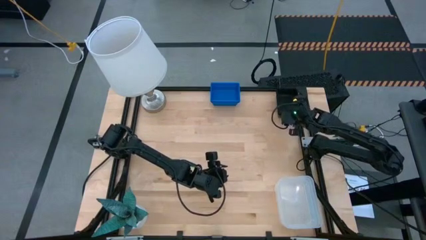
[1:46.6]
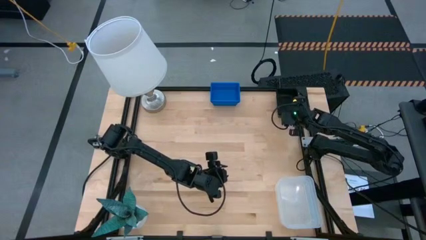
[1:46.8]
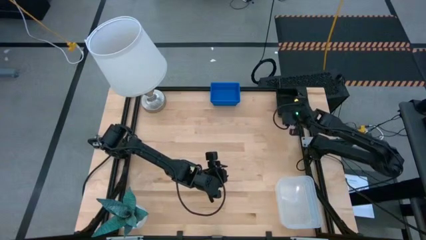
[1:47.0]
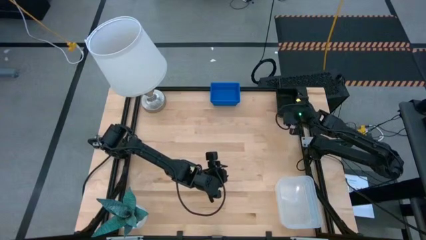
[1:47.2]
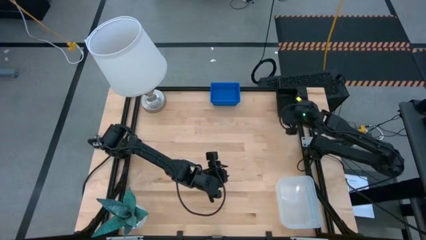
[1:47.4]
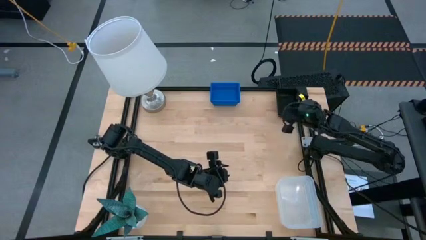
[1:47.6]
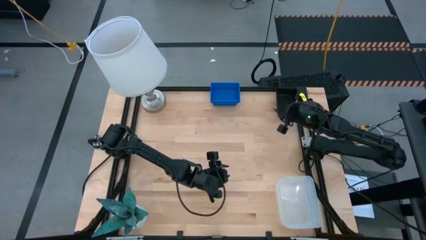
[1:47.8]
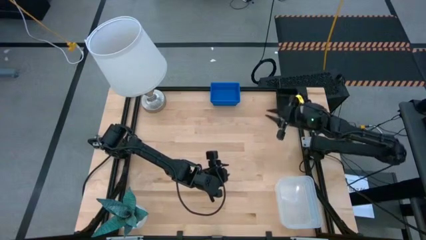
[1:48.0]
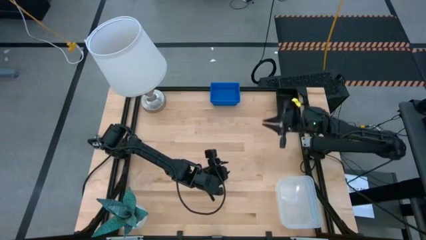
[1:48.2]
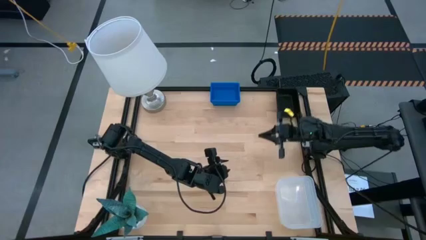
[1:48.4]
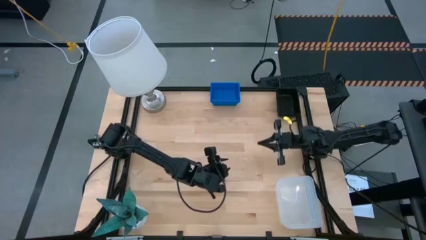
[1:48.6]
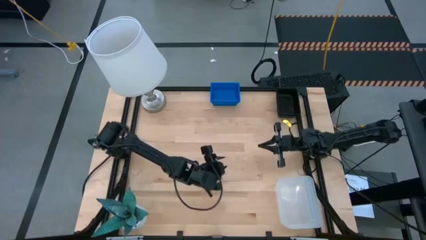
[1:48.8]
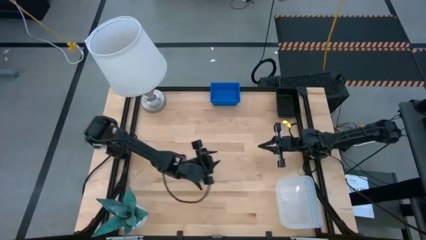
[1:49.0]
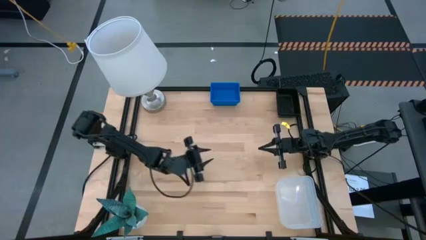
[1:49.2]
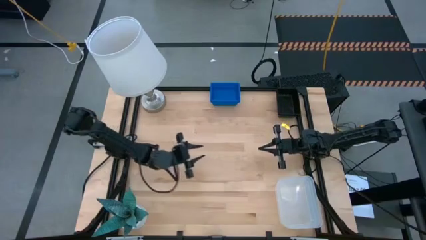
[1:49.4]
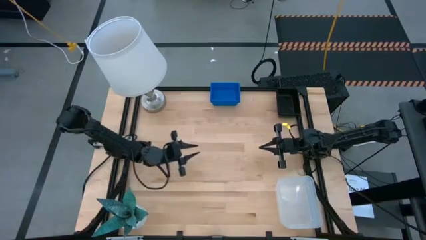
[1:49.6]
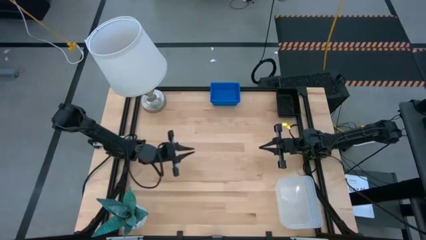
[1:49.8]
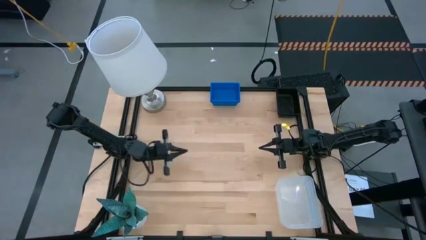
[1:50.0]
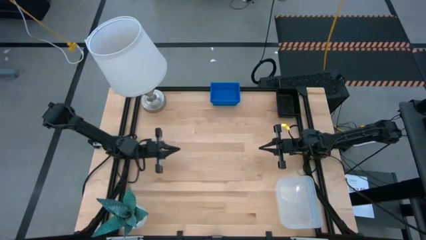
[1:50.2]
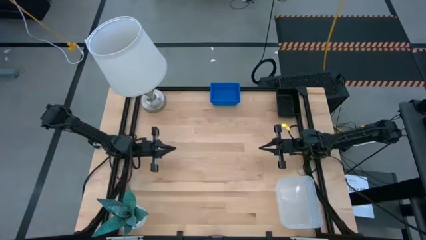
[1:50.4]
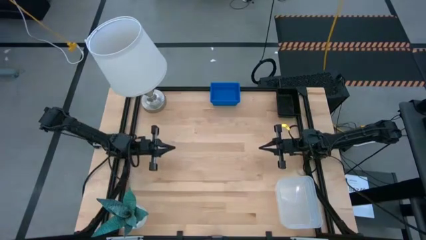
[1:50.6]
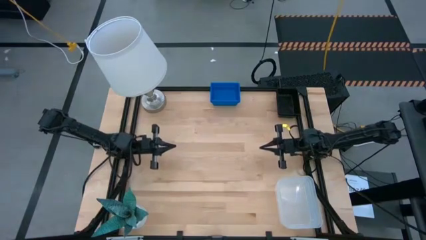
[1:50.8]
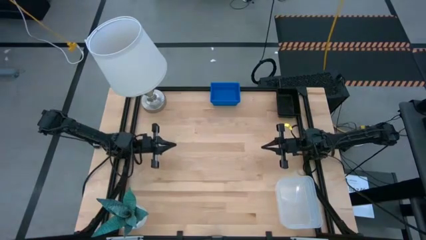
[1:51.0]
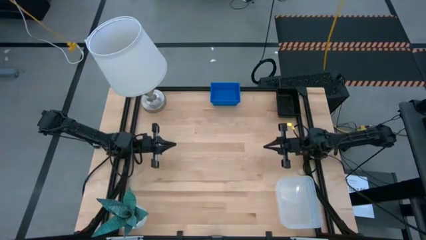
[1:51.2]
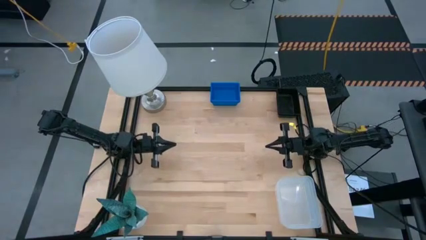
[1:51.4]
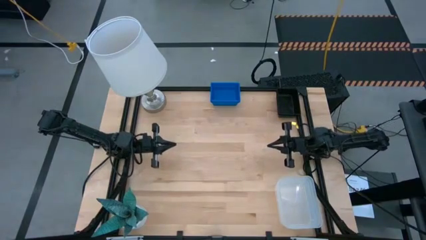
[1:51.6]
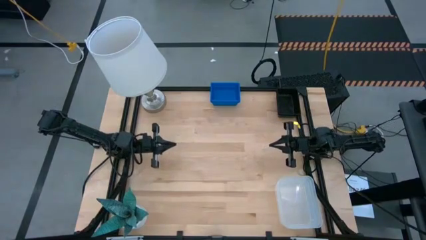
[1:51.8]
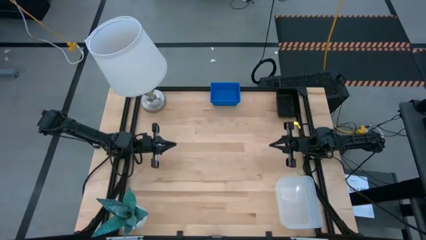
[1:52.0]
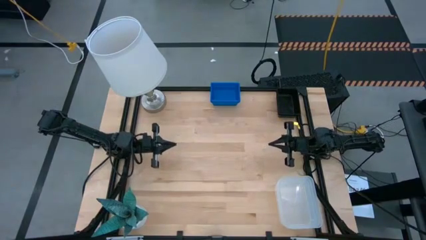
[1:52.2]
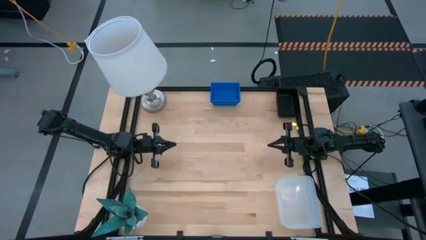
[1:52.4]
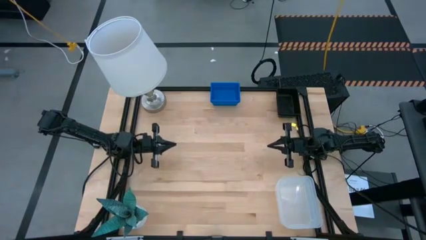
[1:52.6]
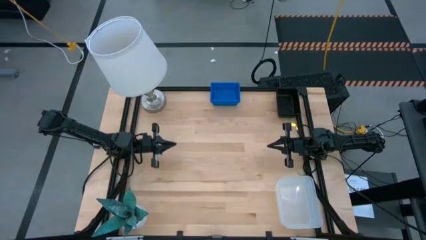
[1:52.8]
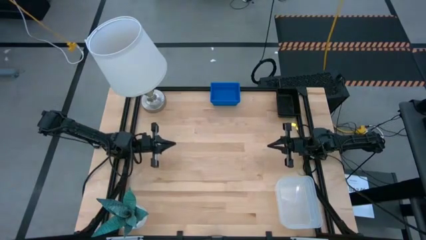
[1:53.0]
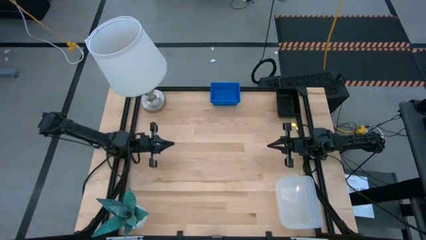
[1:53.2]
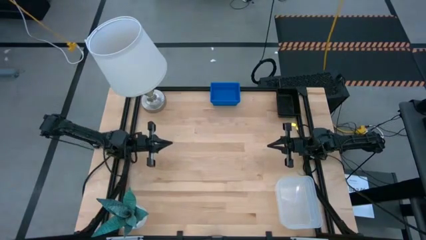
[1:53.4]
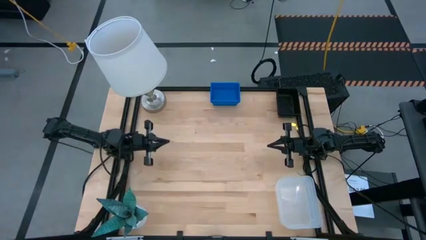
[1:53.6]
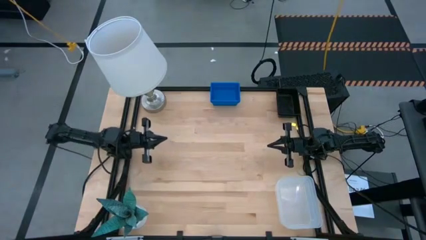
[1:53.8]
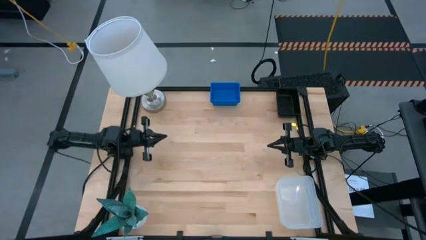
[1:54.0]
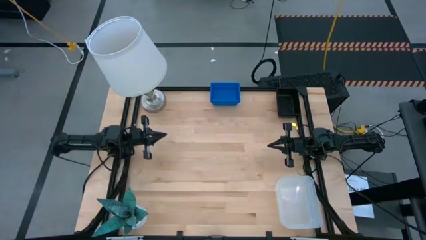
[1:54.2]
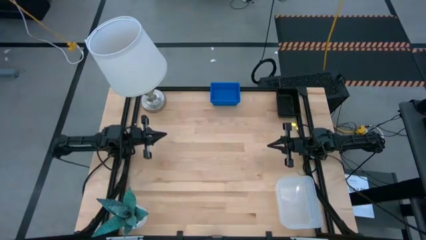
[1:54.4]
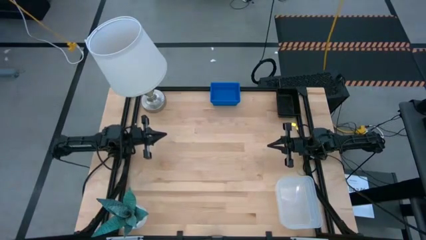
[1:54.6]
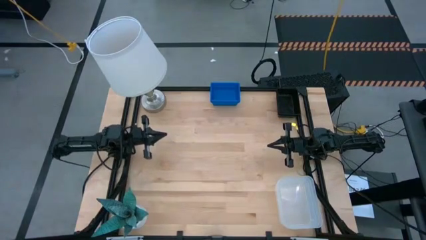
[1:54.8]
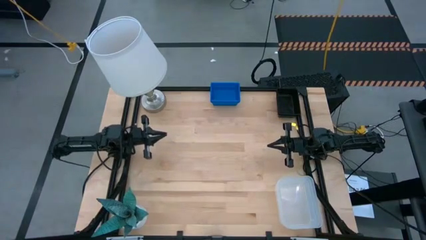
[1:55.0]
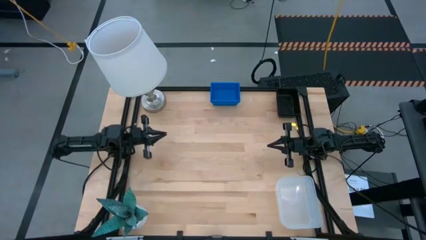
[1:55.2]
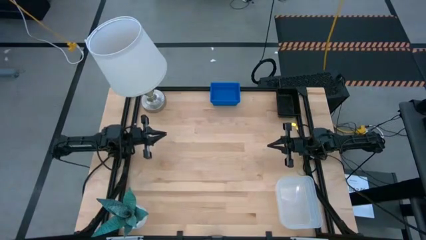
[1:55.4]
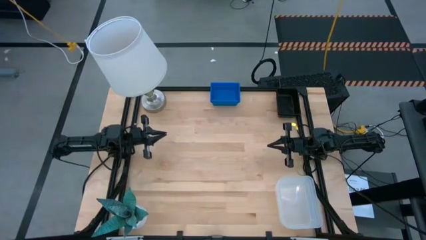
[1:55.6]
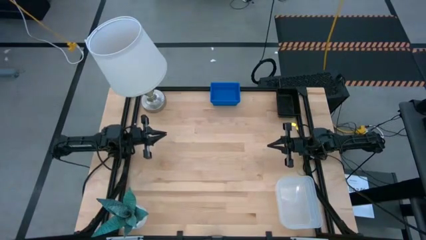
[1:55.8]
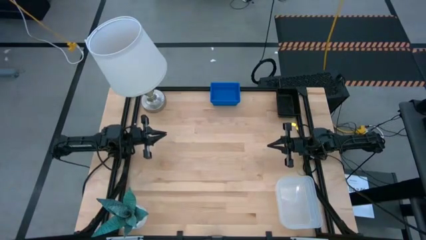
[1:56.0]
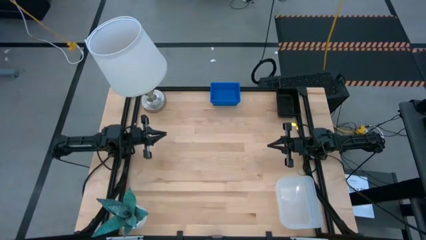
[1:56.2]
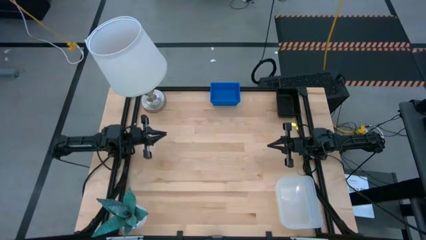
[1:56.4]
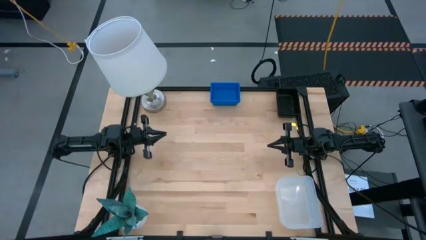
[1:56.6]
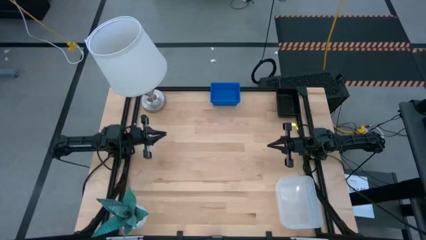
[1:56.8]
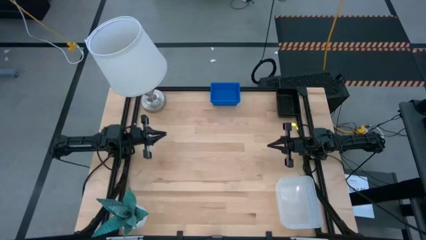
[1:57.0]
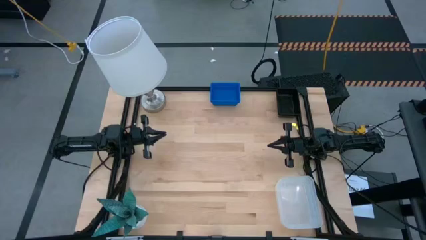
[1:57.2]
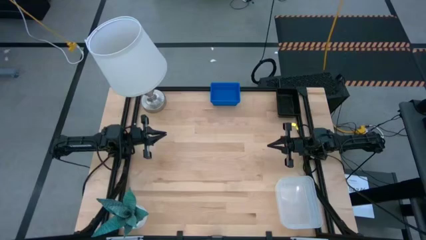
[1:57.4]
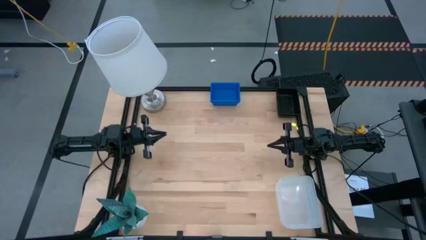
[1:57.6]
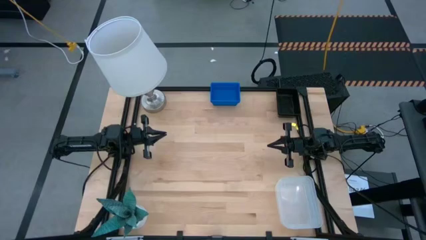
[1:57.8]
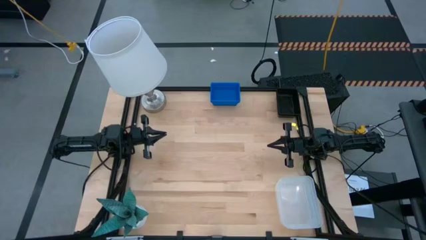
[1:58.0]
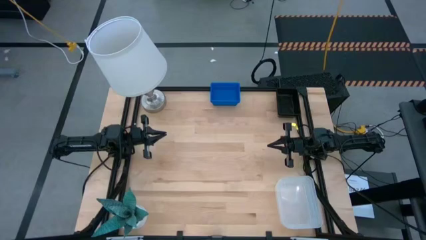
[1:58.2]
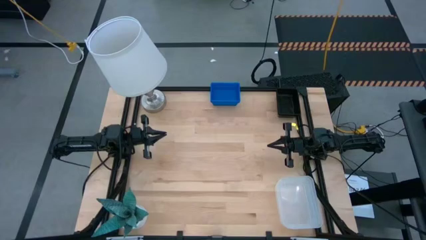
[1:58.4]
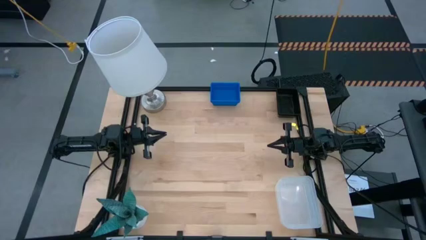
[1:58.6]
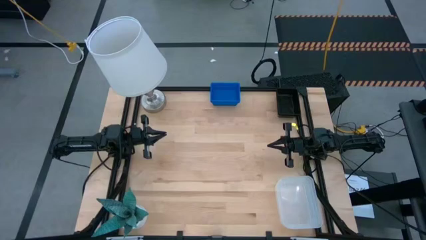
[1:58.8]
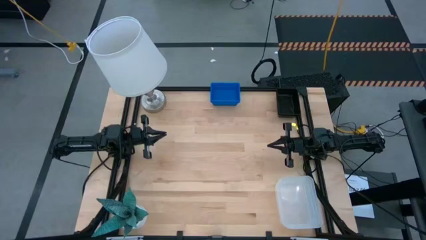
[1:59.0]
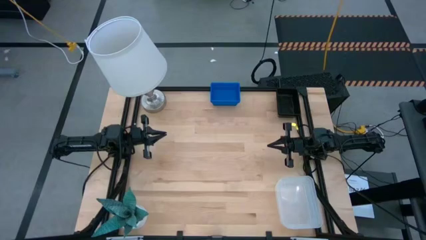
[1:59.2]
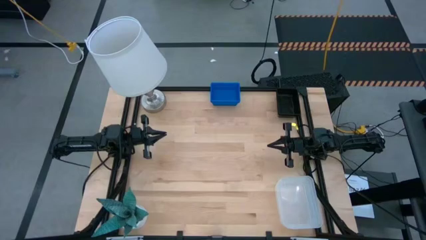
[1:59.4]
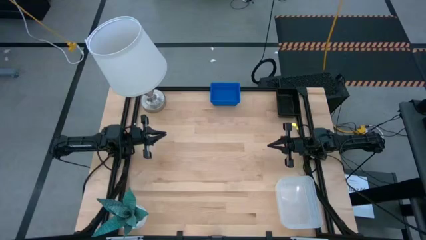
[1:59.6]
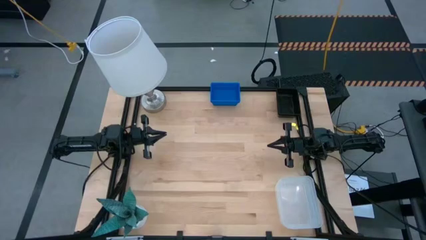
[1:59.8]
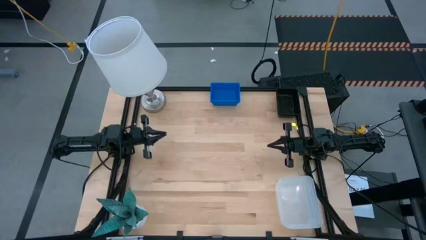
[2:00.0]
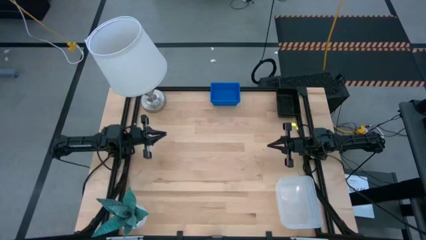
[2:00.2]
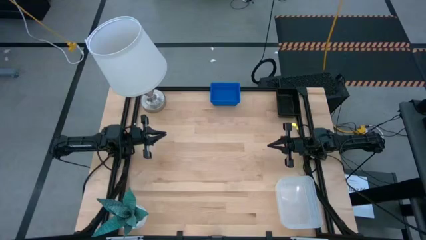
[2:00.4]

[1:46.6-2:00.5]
Return to Home Position
